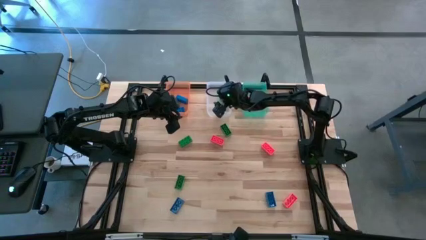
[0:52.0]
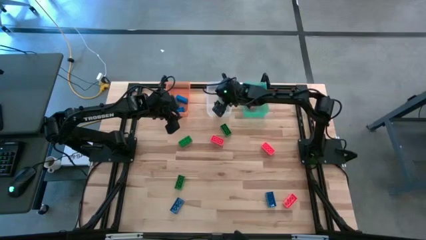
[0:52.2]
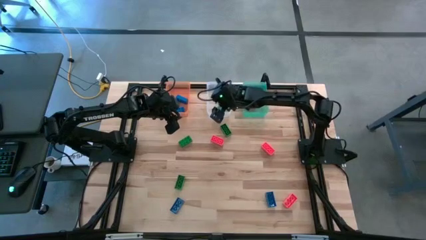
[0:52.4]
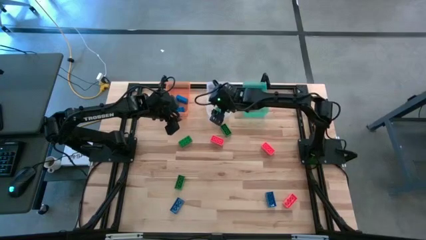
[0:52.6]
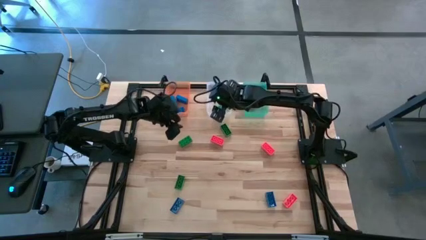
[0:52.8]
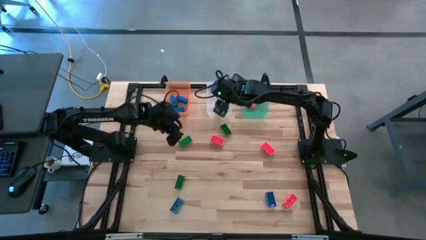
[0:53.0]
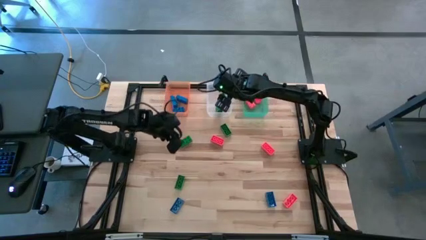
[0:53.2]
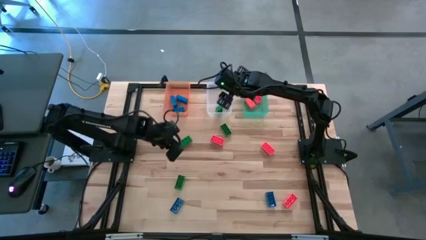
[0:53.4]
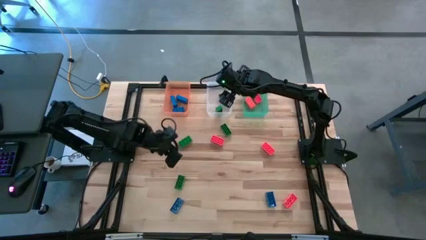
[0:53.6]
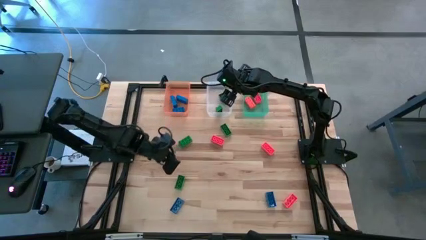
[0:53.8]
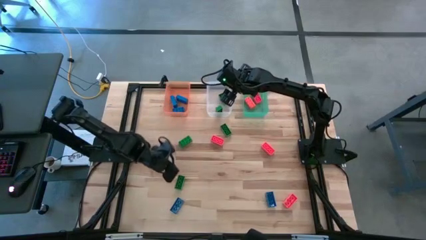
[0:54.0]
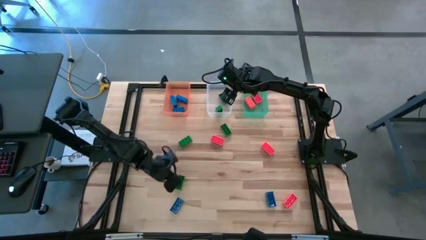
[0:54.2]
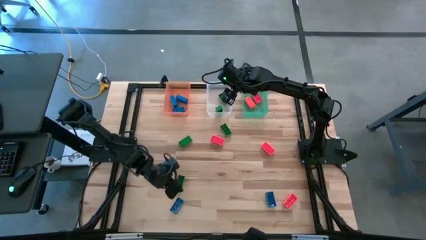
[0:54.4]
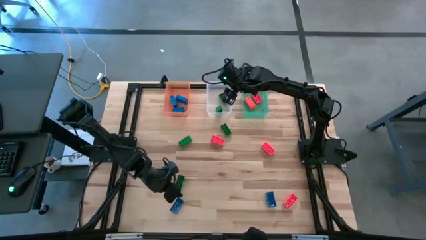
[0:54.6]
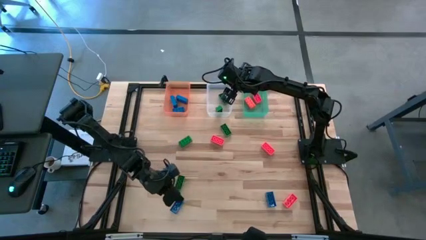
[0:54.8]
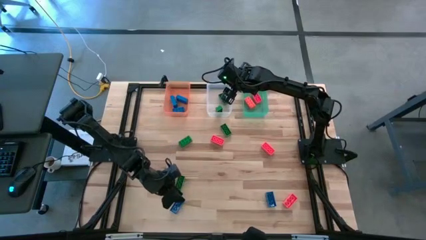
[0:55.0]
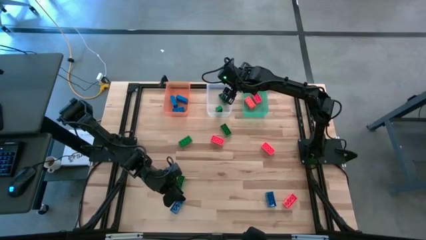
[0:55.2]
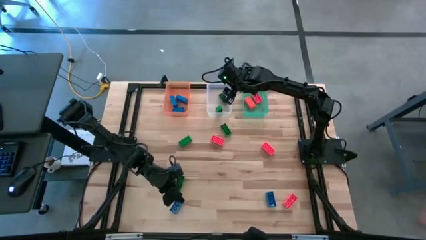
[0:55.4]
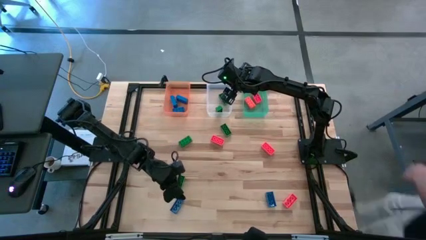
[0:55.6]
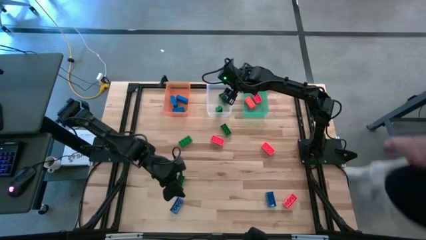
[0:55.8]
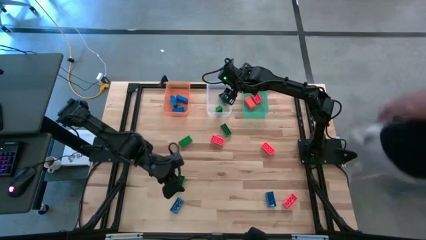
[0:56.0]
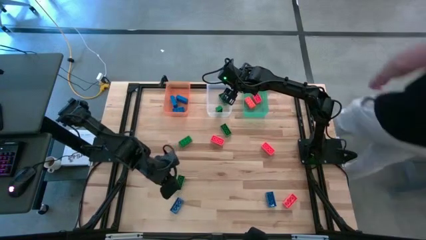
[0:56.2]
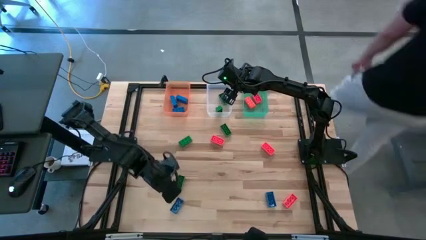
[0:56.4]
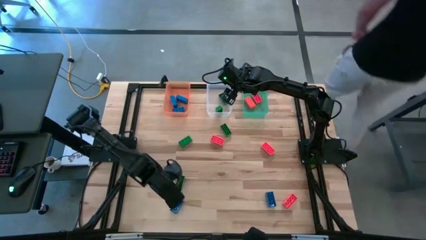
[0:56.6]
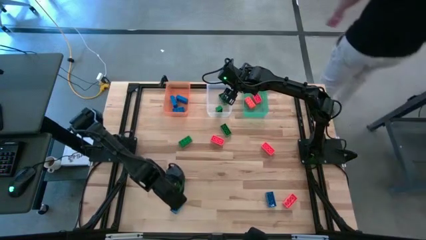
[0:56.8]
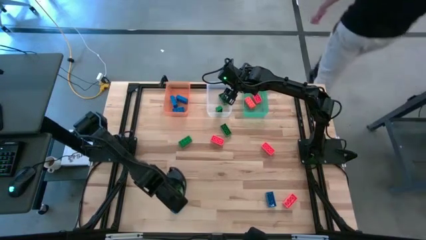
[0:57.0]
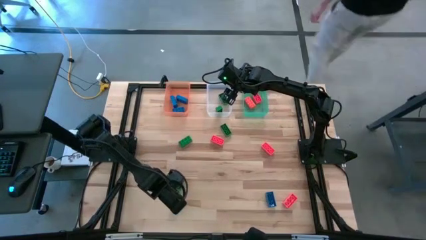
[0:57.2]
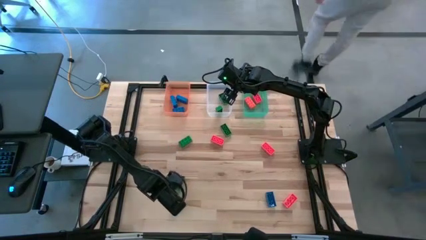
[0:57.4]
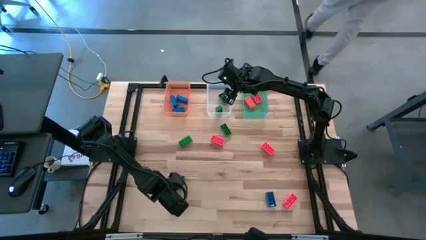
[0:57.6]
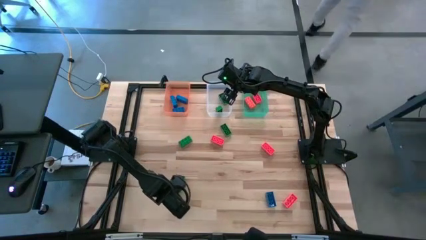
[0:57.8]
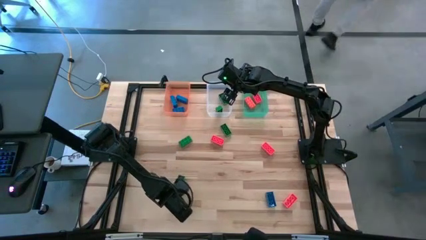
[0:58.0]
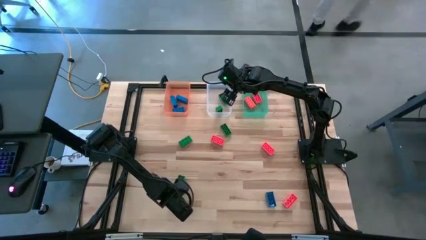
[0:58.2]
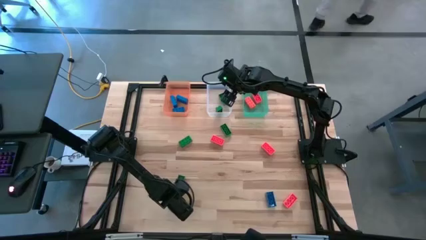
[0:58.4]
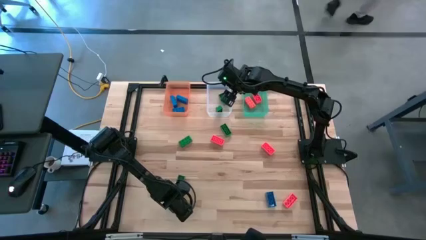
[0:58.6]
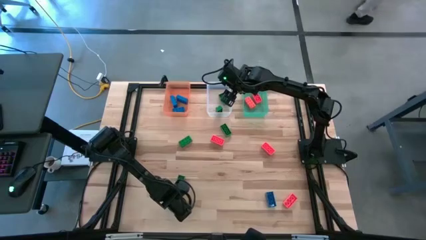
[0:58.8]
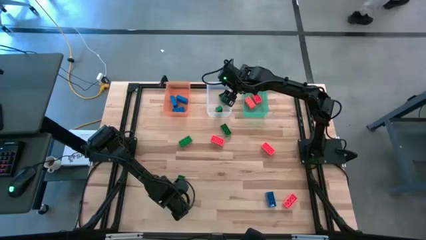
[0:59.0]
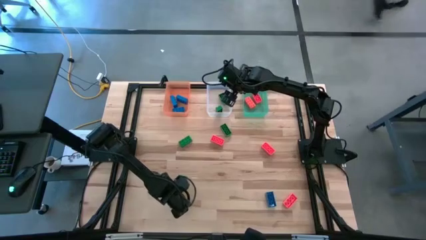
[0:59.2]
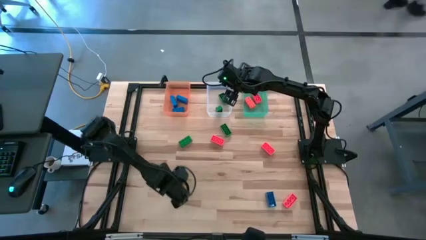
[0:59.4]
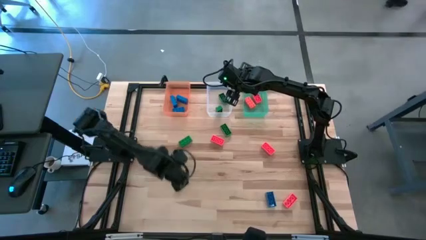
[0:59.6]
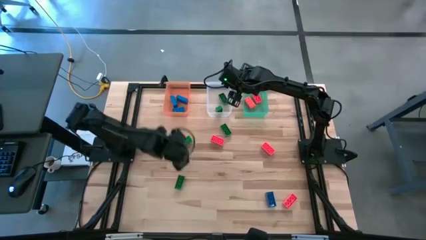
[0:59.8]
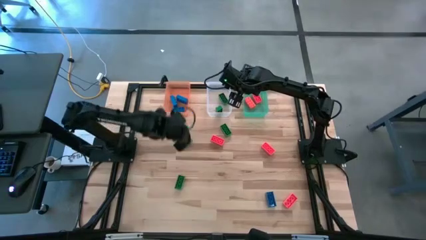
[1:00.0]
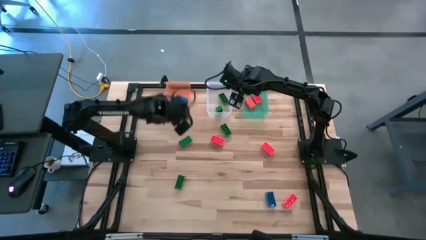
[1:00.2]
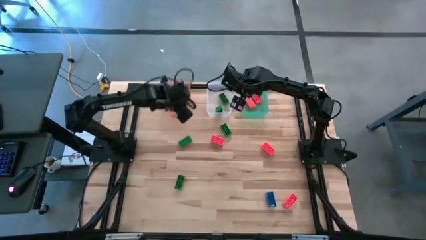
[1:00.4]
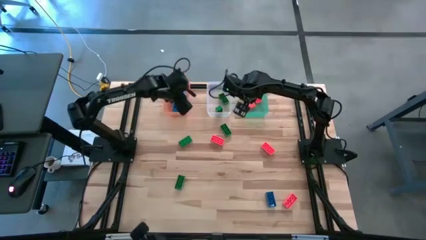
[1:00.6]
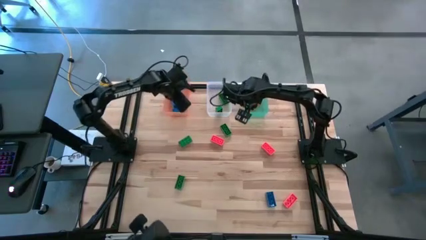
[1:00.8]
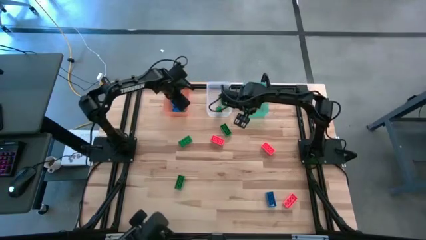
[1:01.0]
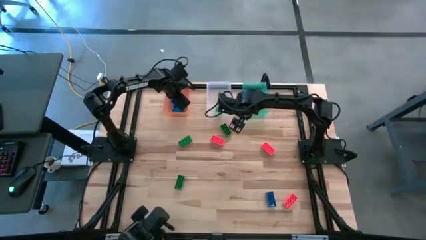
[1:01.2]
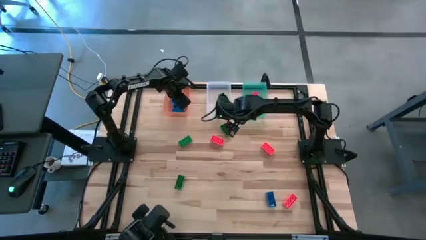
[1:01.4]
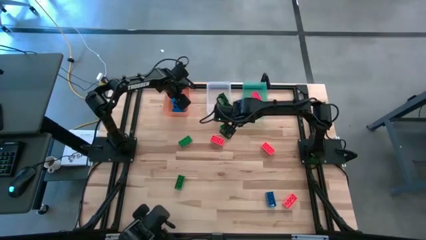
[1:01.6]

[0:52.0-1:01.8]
Task: Sort & place blocks by color
Put the blue game piece into the bin

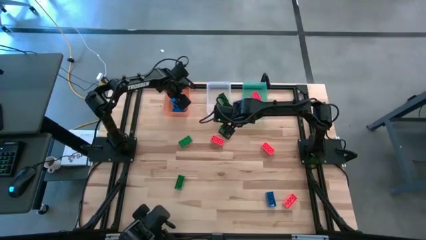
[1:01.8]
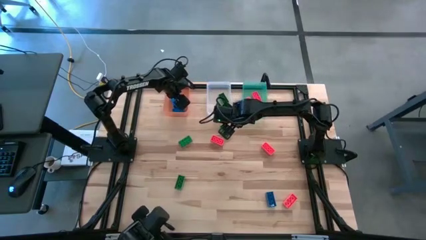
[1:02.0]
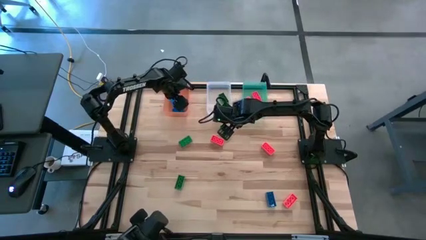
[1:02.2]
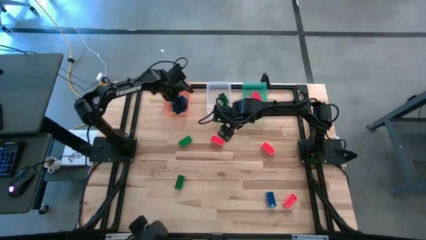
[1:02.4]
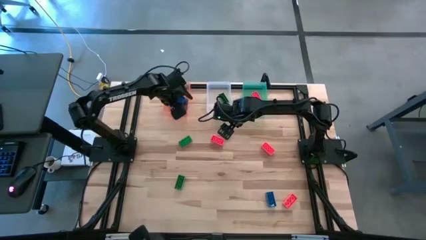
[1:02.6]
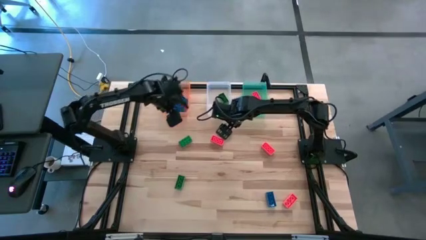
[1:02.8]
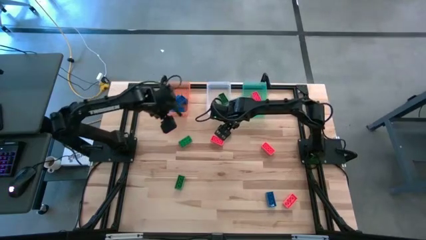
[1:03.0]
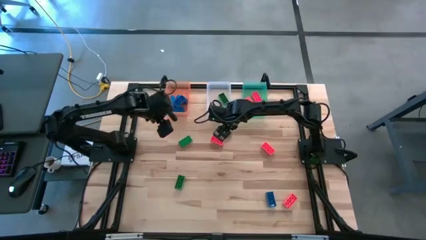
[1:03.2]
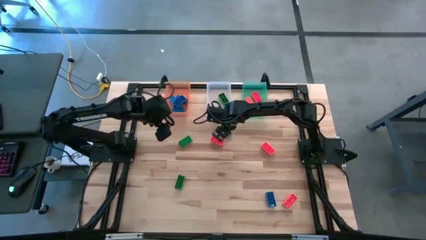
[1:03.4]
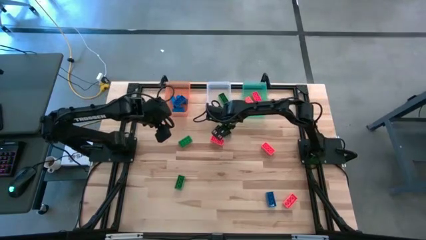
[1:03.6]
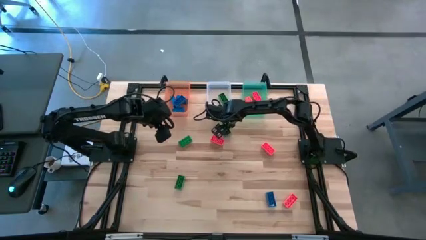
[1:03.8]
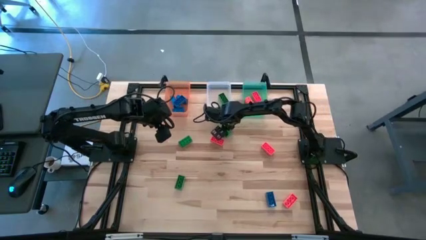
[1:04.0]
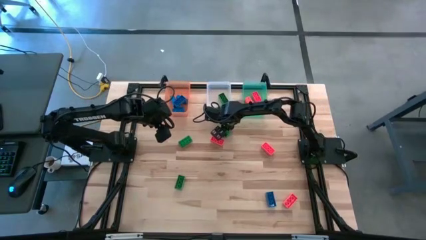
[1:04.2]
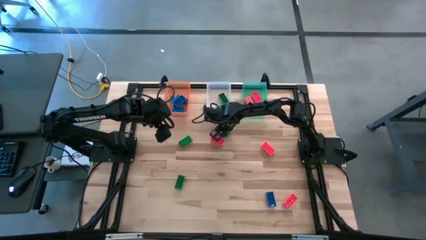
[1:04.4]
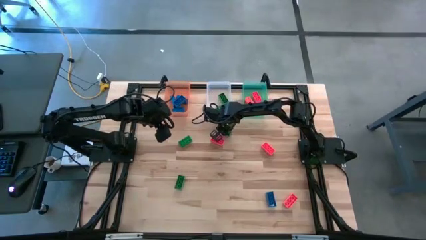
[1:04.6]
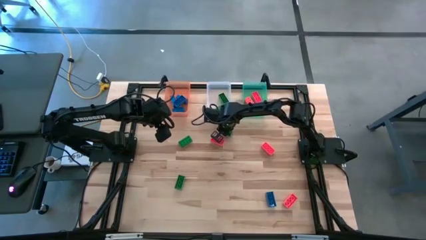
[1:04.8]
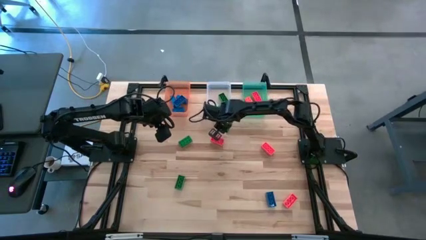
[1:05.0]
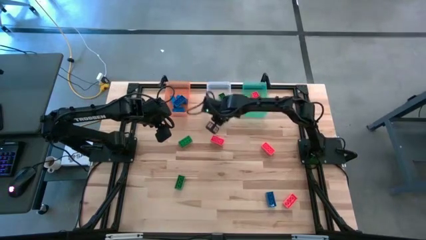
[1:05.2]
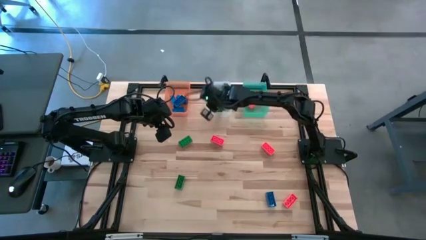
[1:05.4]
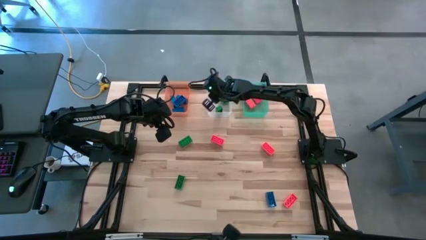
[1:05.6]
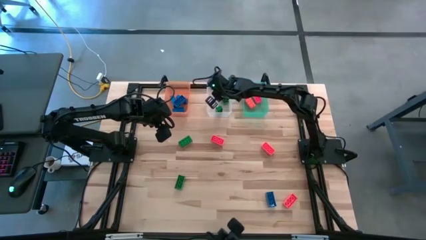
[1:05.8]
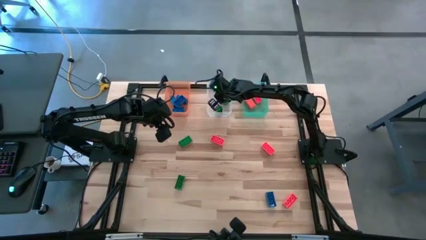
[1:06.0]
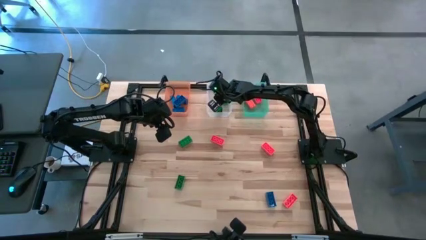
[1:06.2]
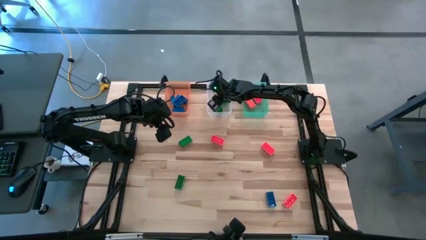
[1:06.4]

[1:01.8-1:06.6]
Put the green game piece into the bin
